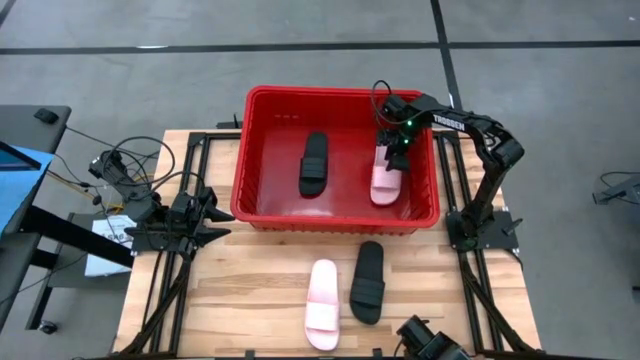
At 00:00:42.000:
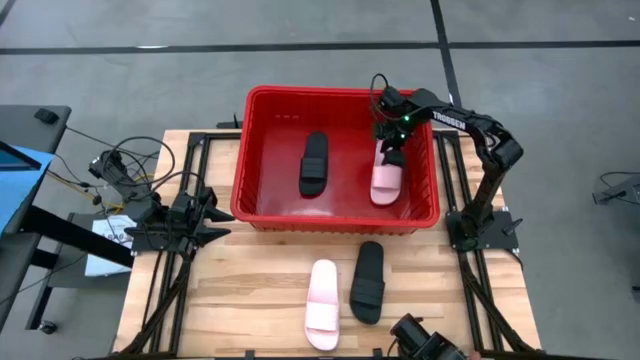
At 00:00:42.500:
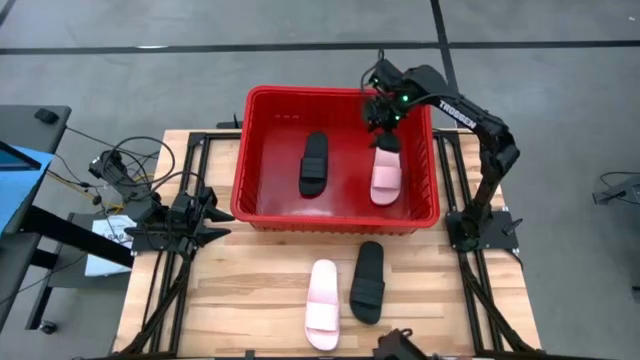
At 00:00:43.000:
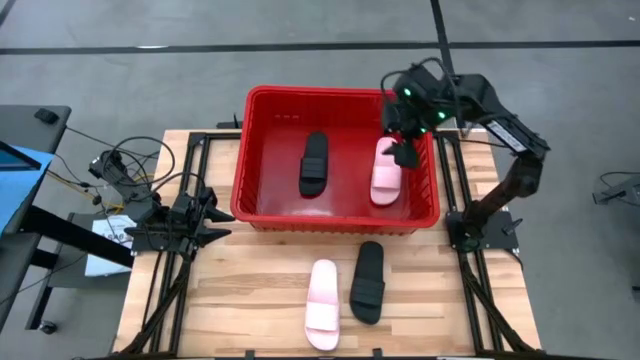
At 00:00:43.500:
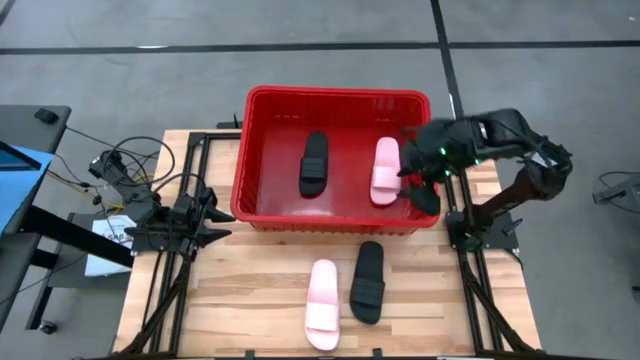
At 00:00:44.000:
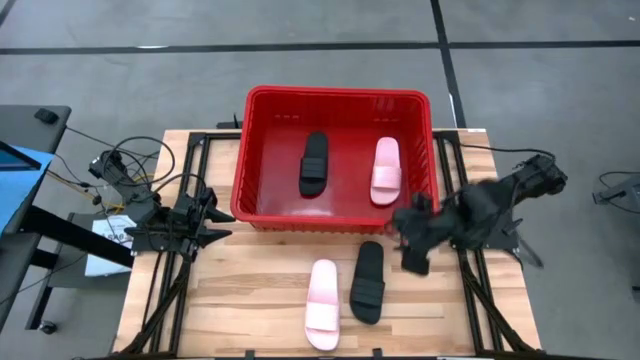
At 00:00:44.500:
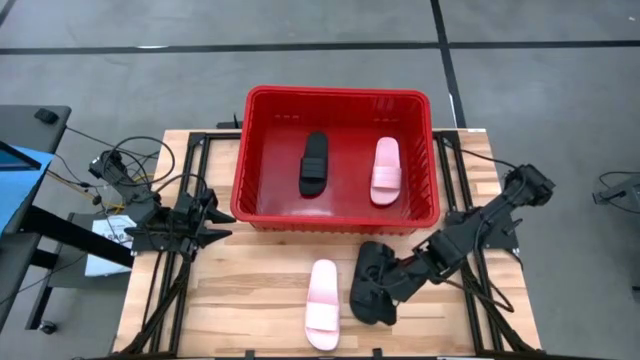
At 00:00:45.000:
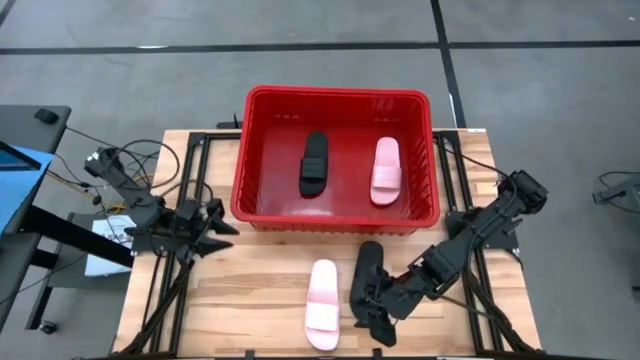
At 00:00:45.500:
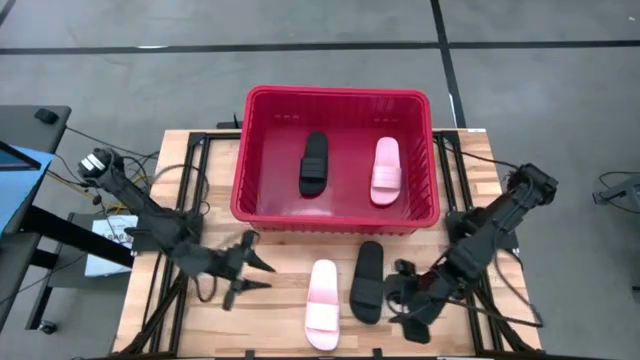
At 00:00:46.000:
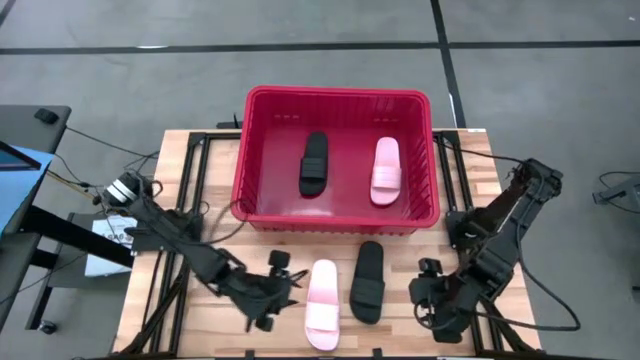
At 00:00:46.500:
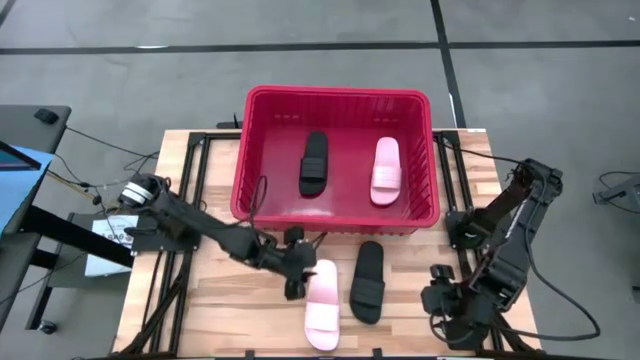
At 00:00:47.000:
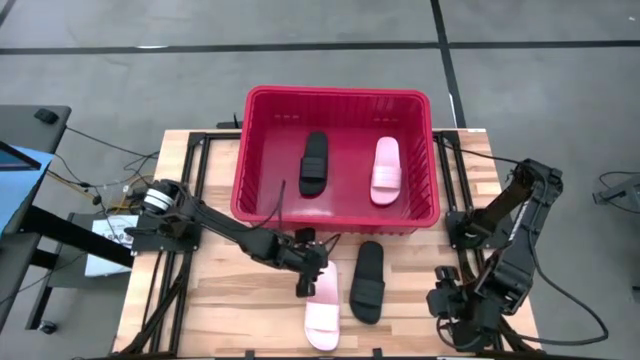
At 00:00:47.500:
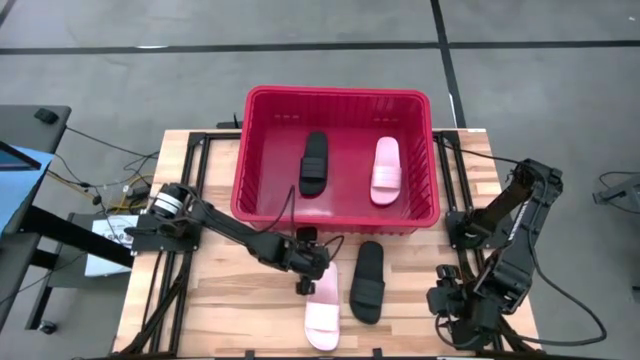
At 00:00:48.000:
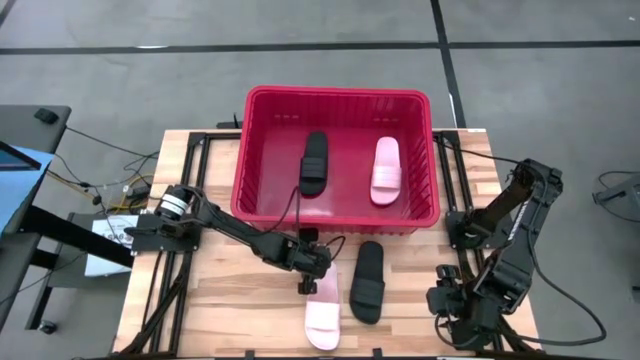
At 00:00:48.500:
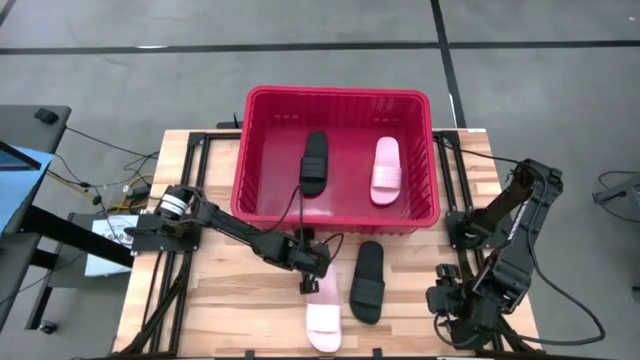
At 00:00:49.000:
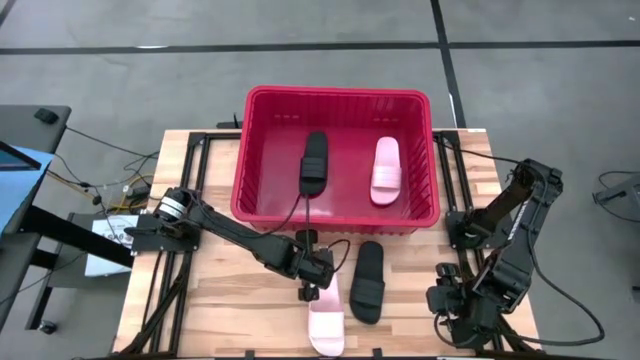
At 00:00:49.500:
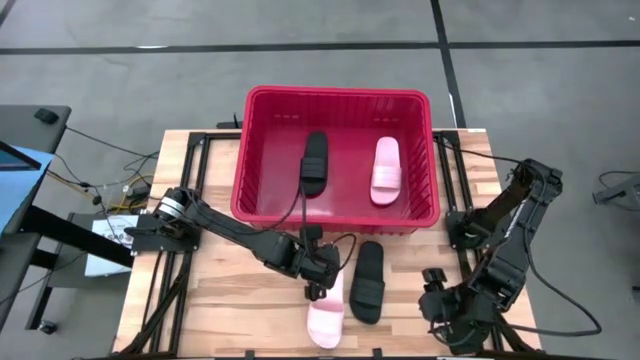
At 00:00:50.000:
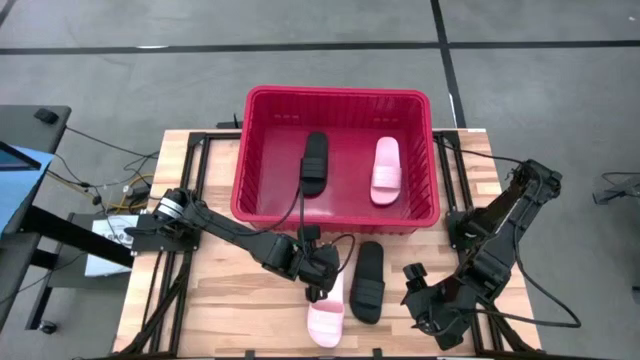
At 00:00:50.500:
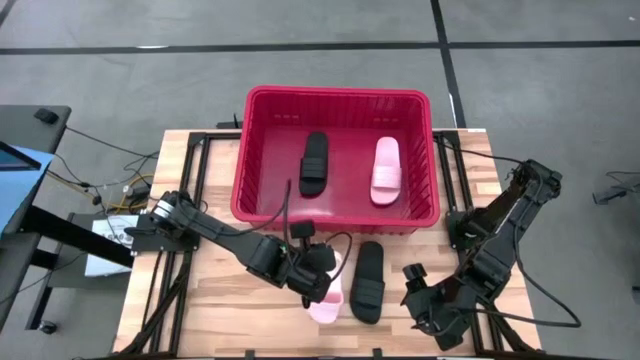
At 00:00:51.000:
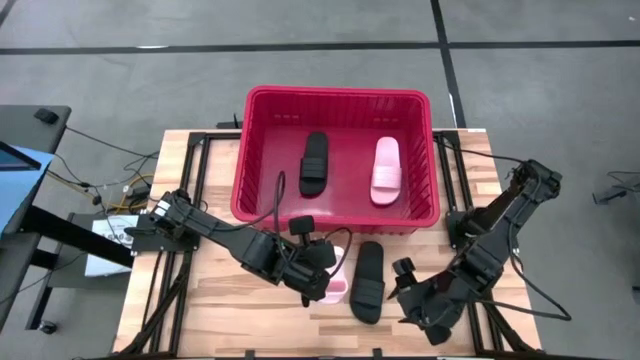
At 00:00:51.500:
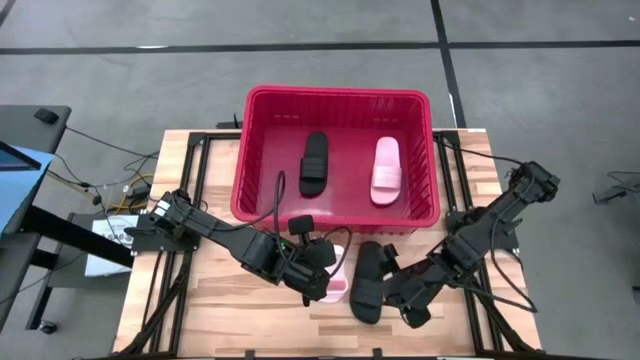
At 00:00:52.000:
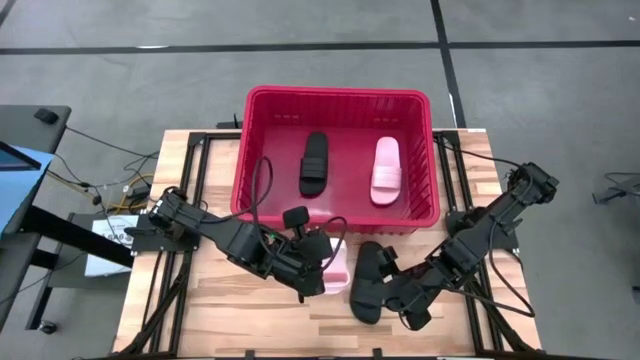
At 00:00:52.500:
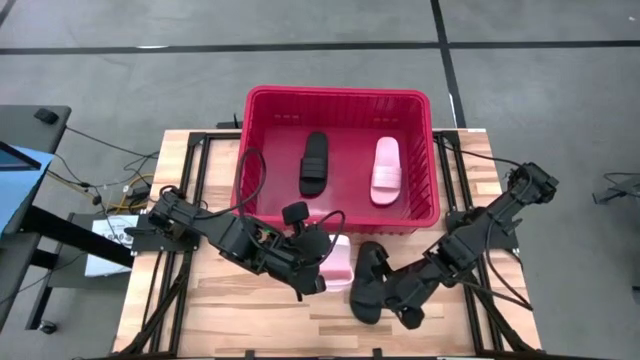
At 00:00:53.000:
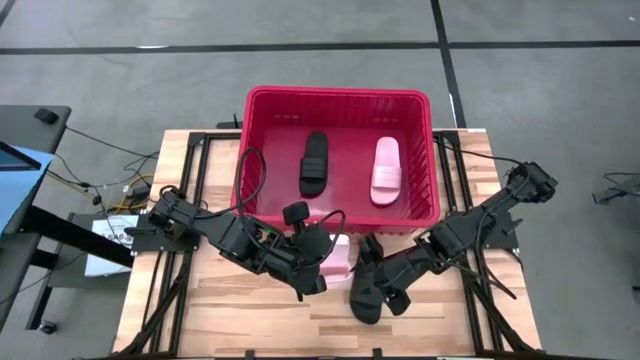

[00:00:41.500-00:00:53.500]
Task: Pick and place slides into bin
Put the pink slide into the red container

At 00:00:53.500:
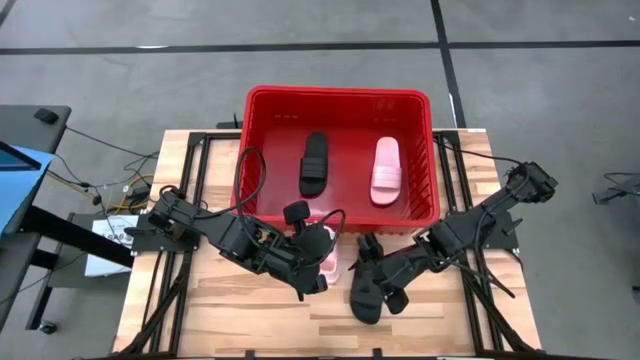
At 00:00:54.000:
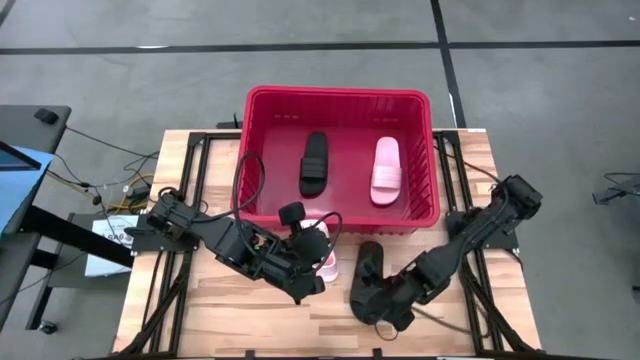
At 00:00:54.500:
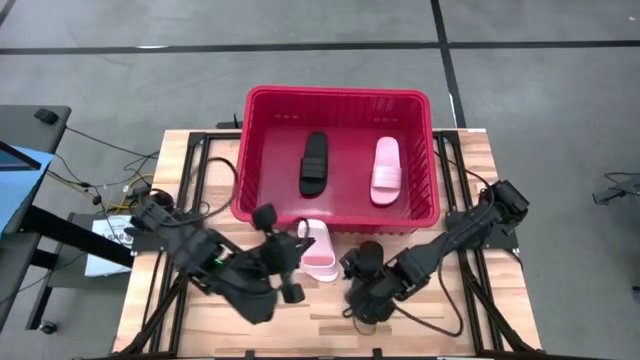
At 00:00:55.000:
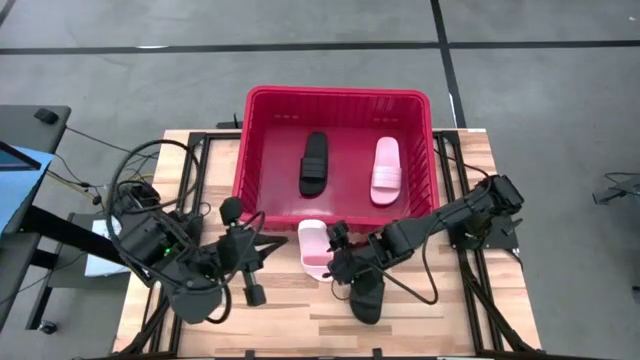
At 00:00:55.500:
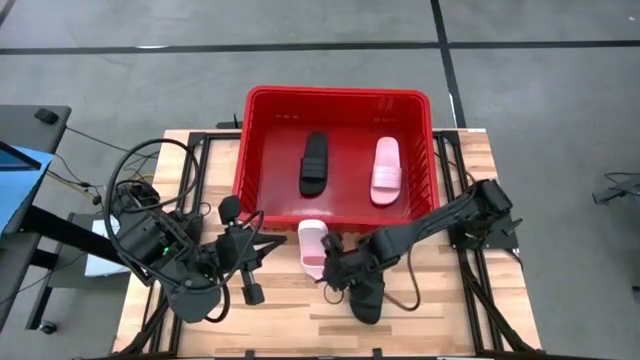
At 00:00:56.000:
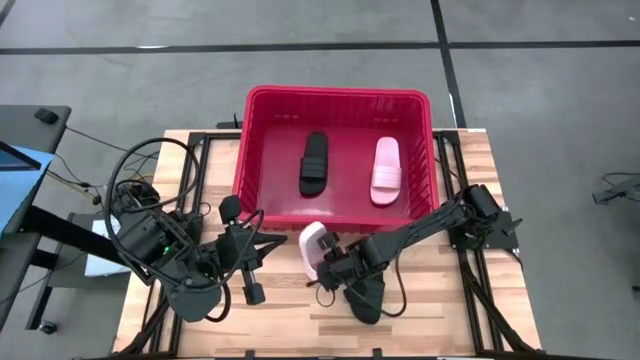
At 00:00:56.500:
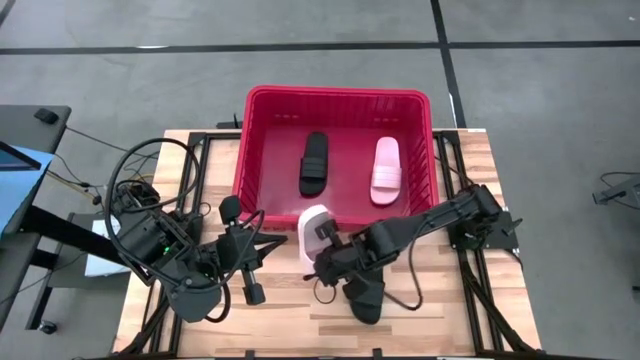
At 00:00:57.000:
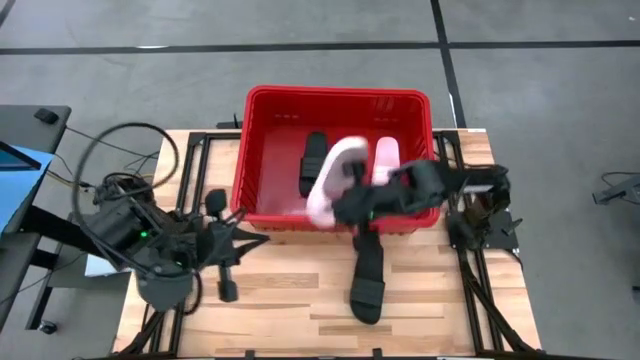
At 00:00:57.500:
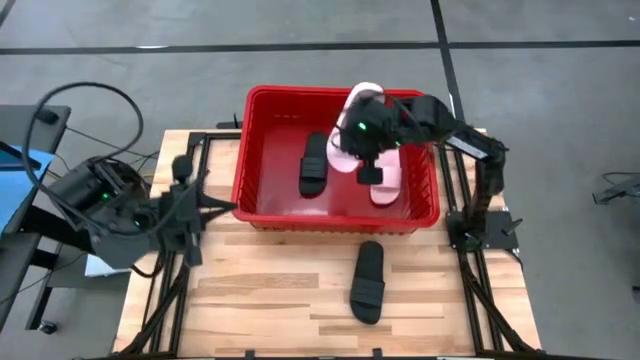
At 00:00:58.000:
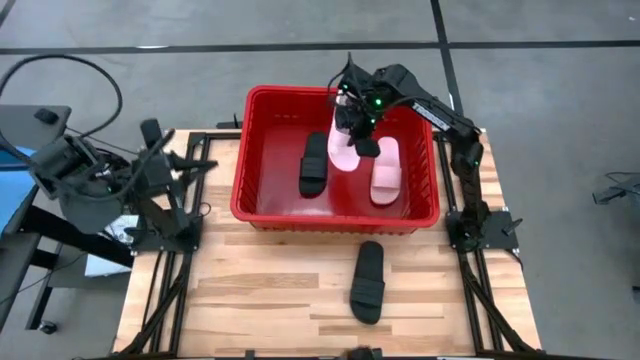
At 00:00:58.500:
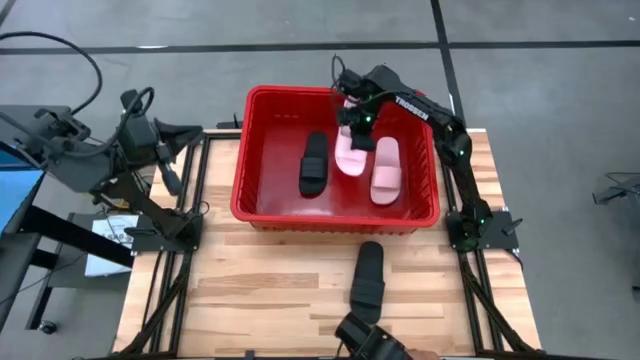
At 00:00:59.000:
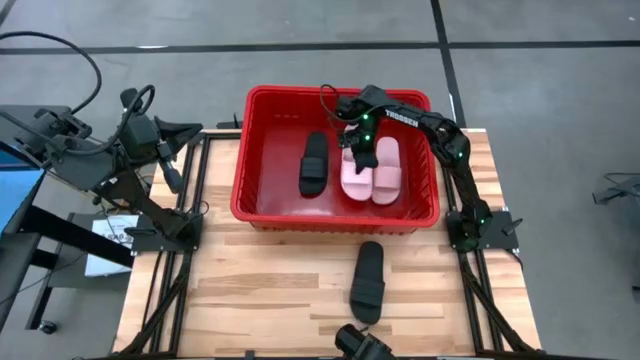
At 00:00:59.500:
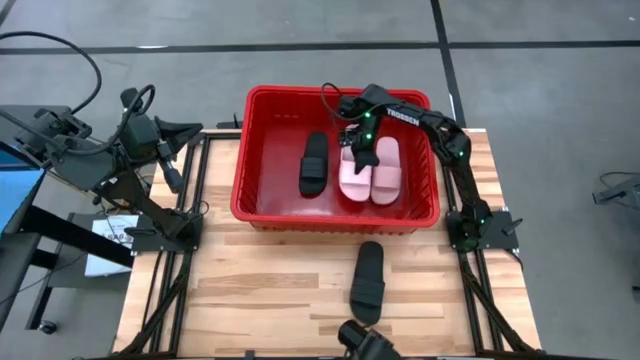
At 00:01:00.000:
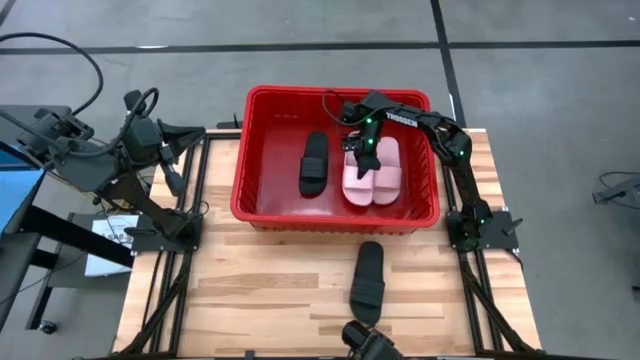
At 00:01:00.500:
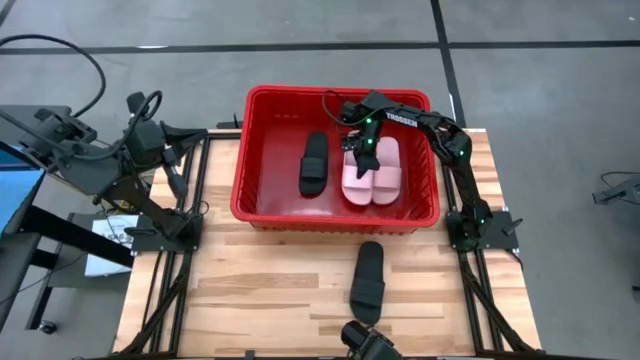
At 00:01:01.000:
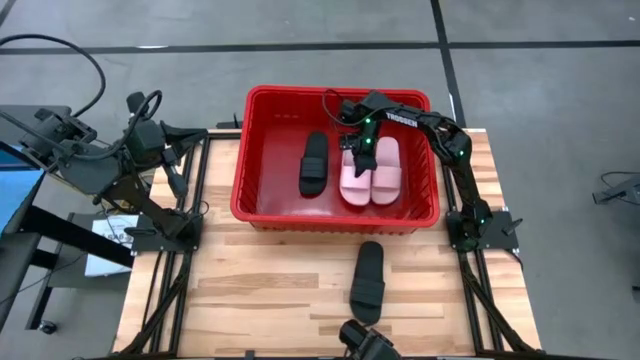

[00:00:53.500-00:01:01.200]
Put the pink slide into the red container
